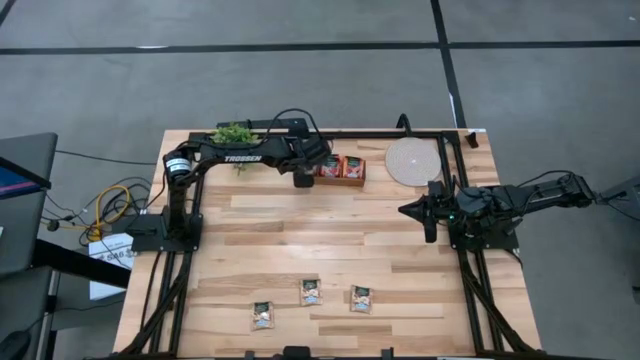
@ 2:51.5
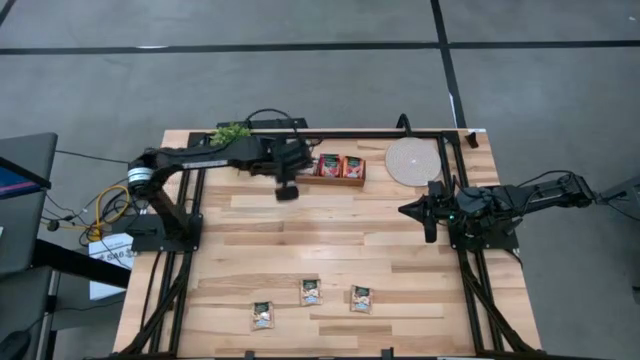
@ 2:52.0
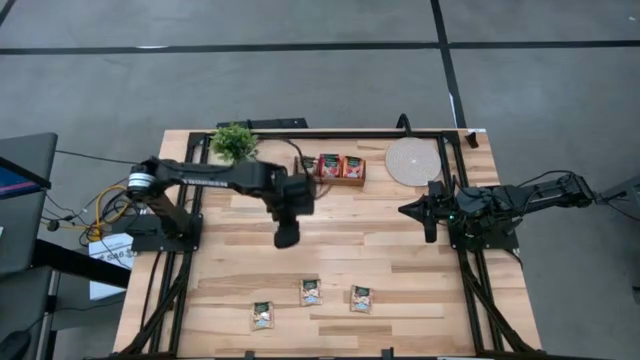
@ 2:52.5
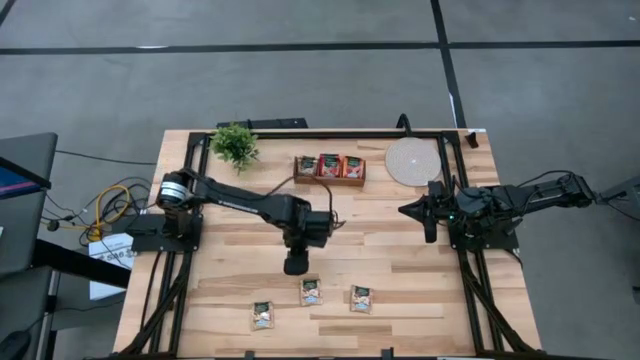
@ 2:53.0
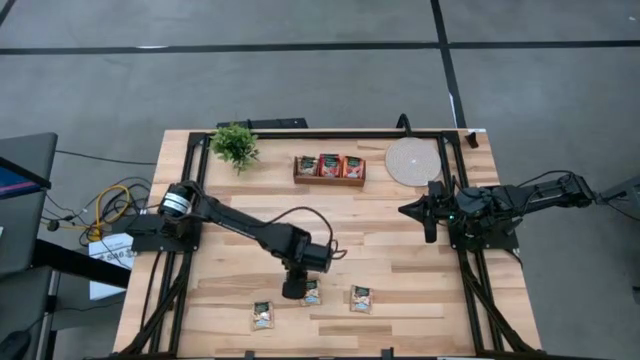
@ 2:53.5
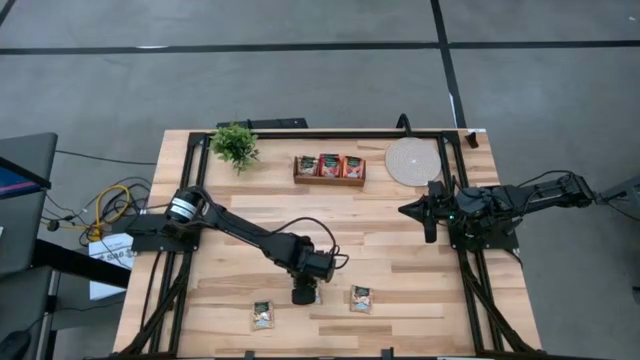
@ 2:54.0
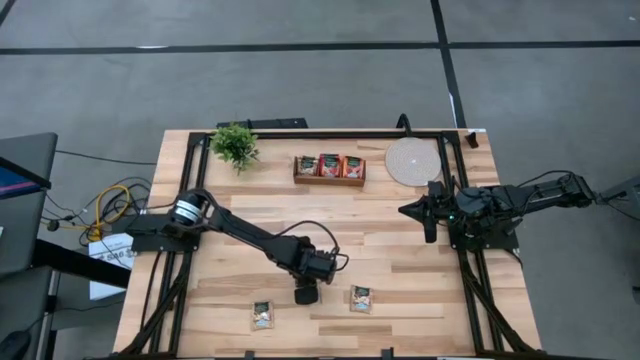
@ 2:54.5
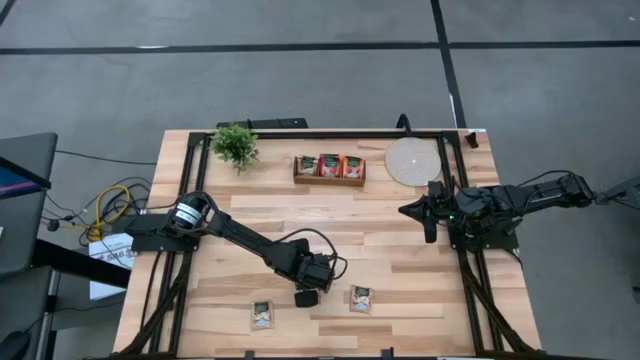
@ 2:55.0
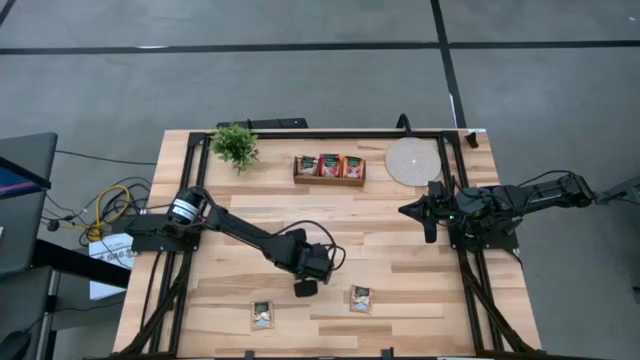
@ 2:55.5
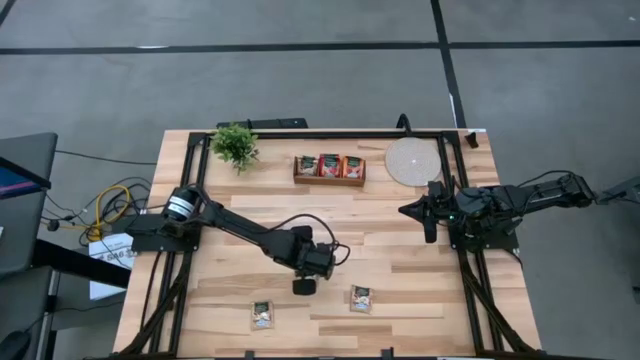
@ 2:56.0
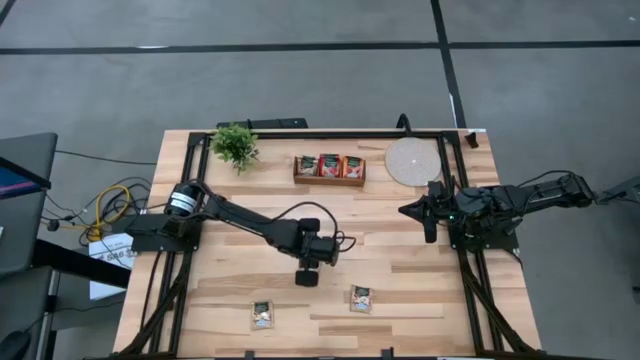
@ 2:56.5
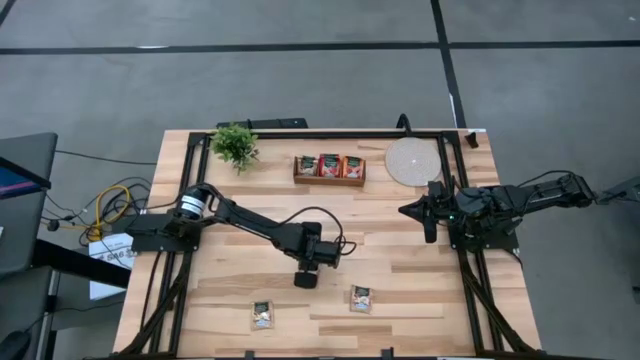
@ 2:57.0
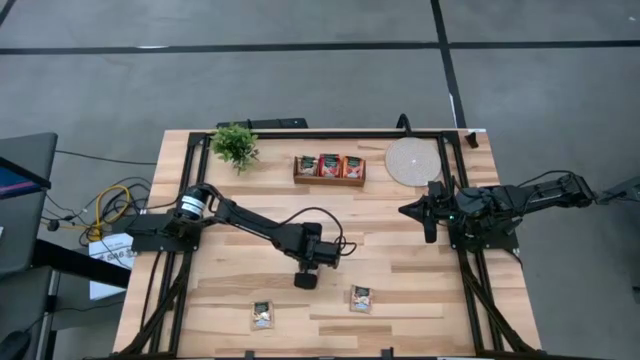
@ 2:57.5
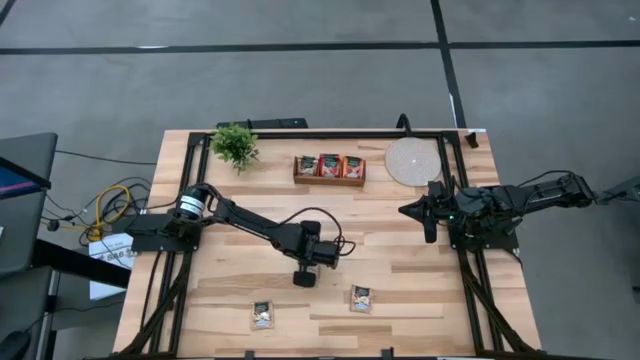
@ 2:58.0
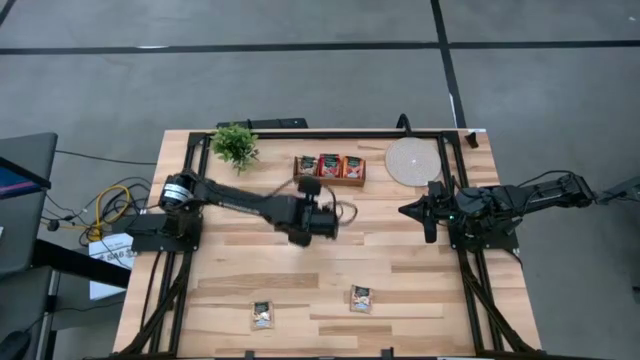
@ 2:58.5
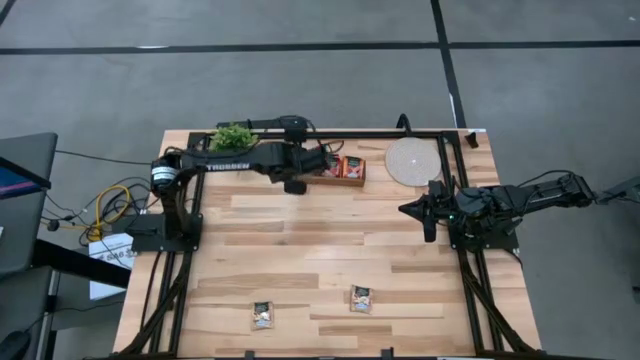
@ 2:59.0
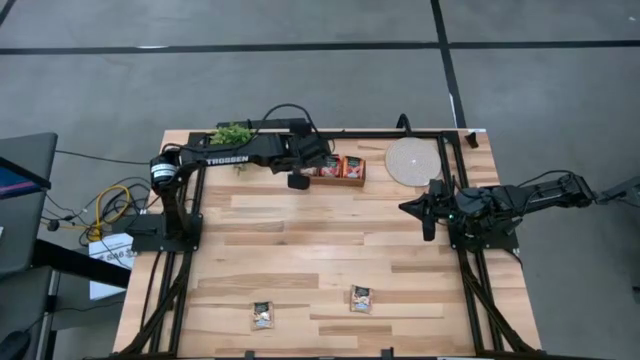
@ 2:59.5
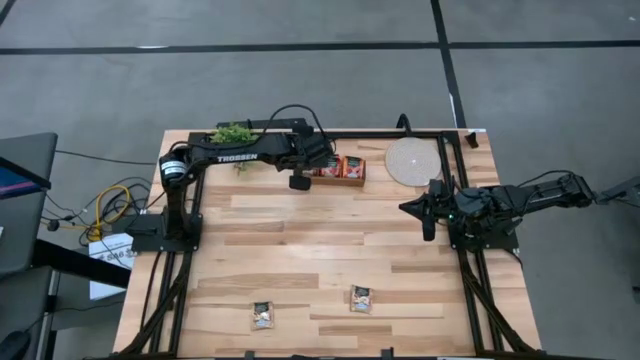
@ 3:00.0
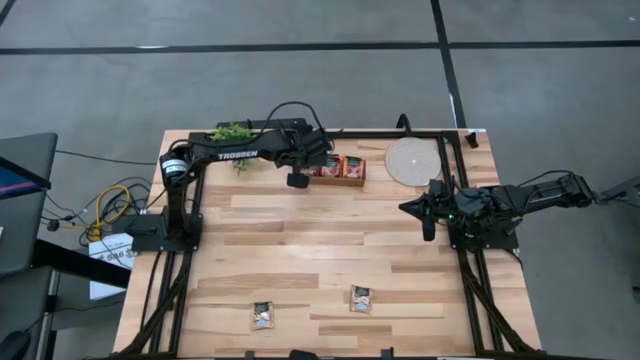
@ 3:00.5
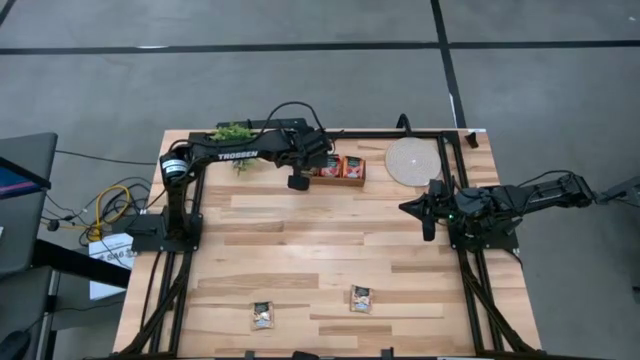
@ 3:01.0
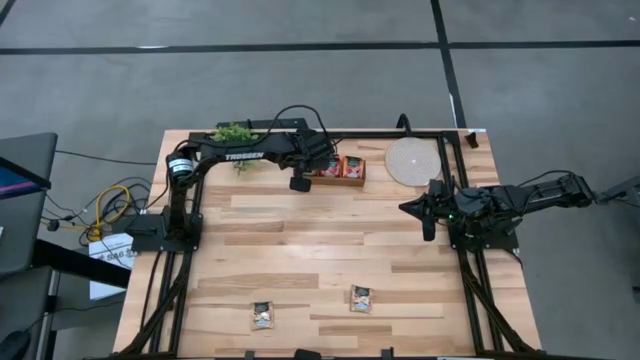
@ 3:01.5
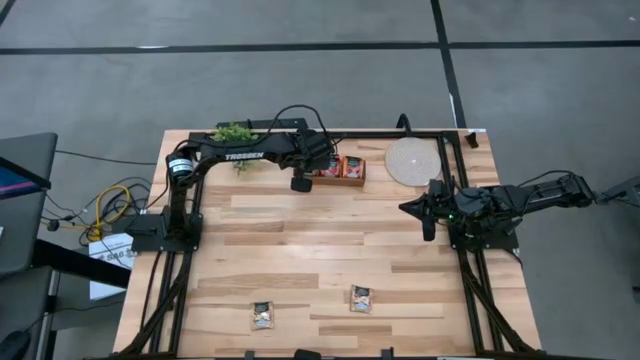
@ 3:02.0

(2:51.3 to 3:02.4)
Task: Pick & Place Tea
Put the brown tea bag into the left section of the wooden organizer

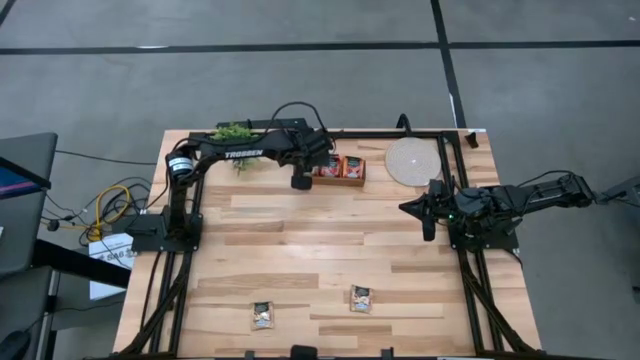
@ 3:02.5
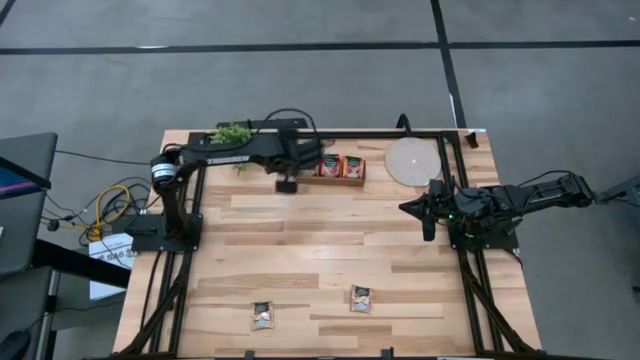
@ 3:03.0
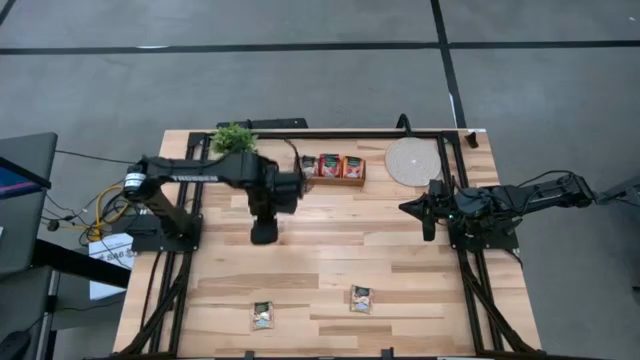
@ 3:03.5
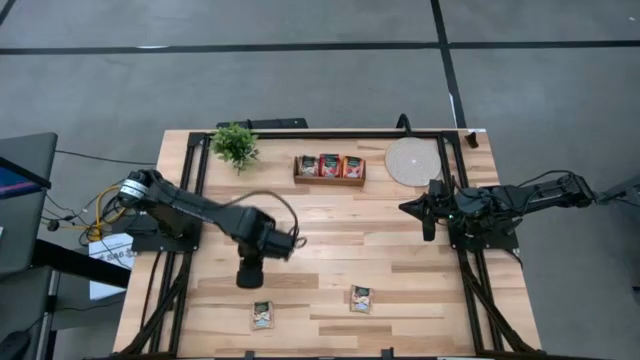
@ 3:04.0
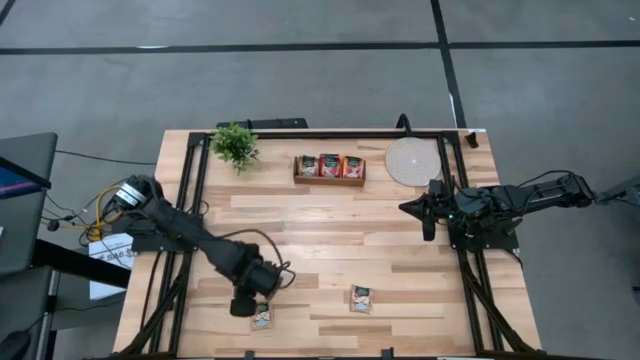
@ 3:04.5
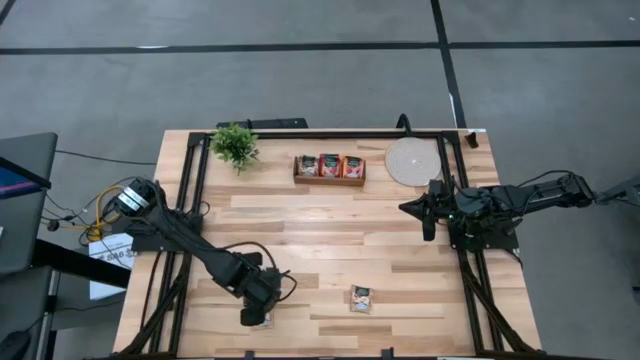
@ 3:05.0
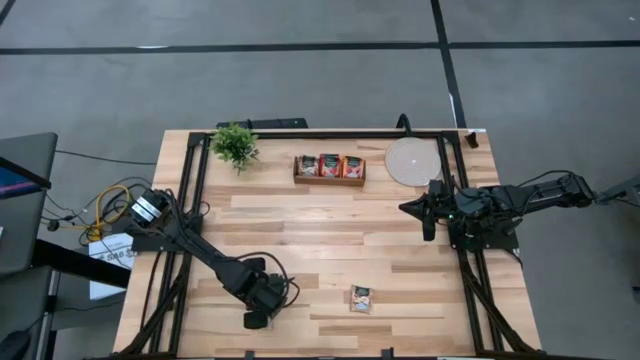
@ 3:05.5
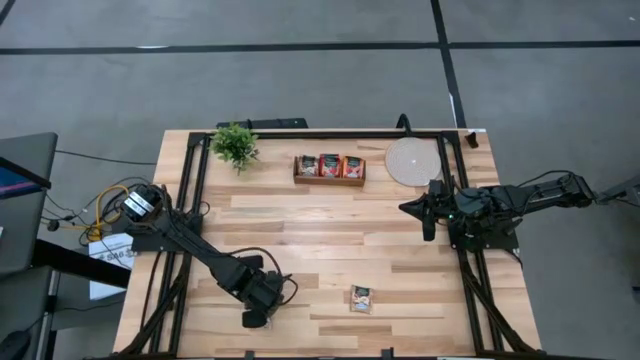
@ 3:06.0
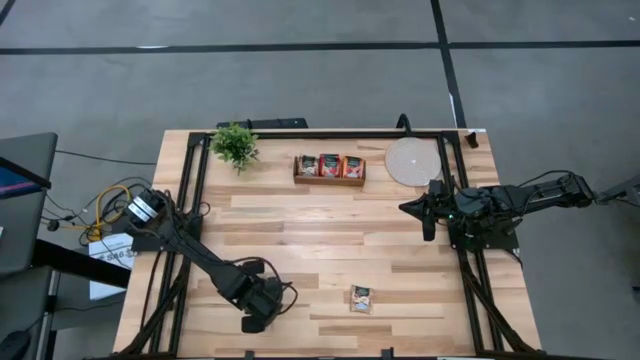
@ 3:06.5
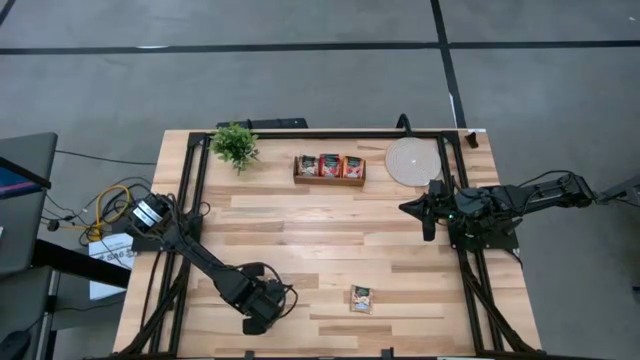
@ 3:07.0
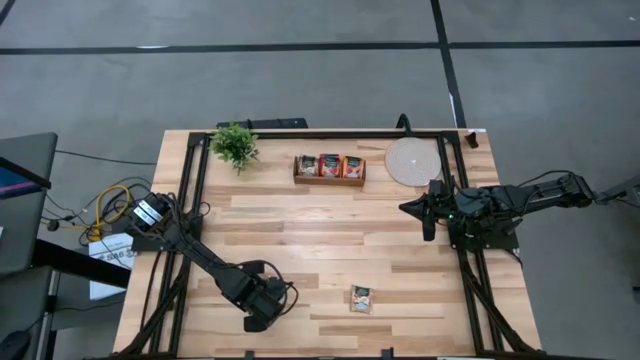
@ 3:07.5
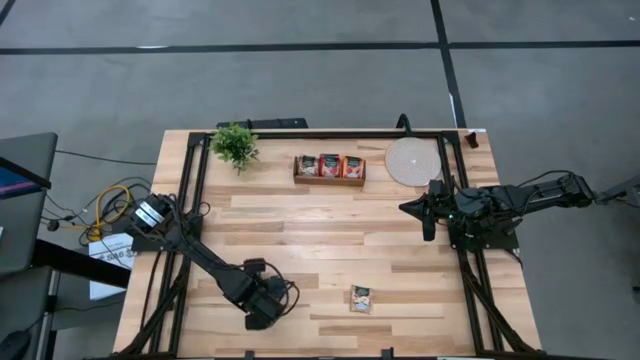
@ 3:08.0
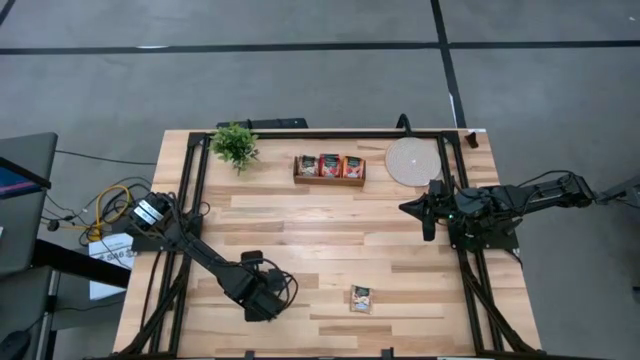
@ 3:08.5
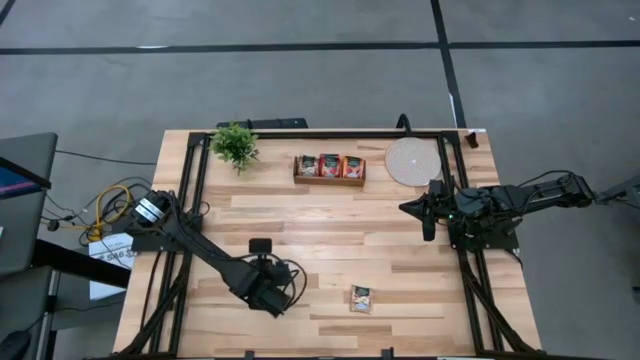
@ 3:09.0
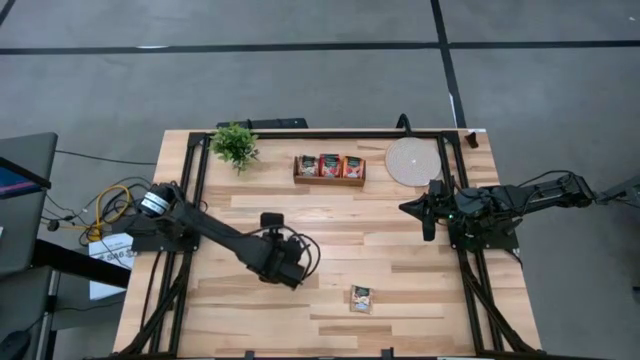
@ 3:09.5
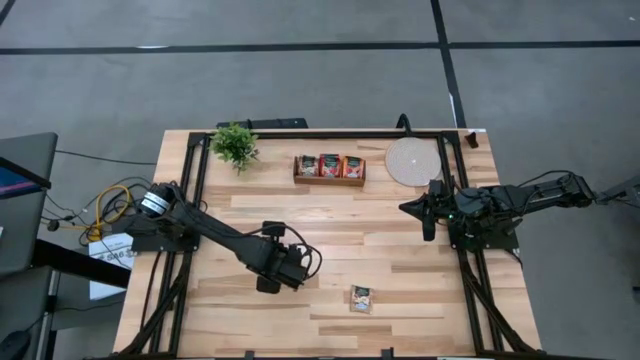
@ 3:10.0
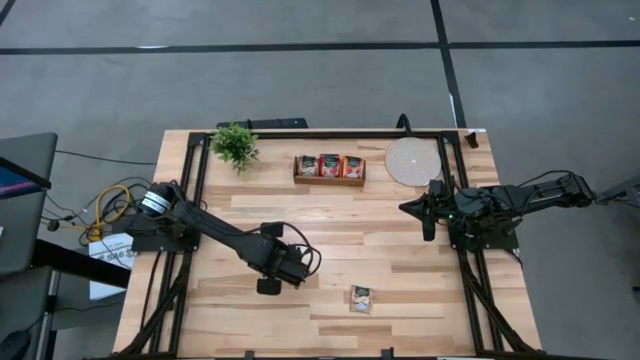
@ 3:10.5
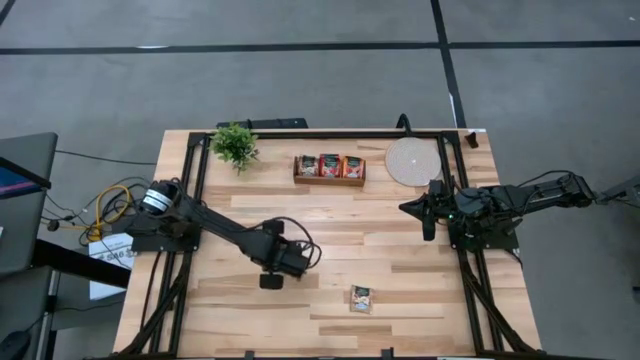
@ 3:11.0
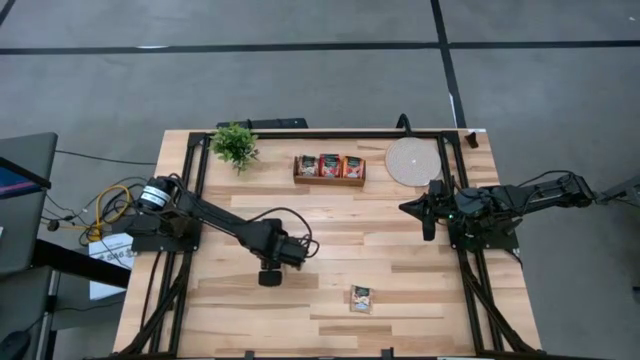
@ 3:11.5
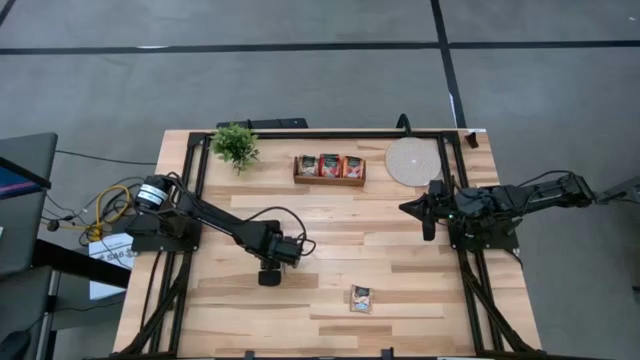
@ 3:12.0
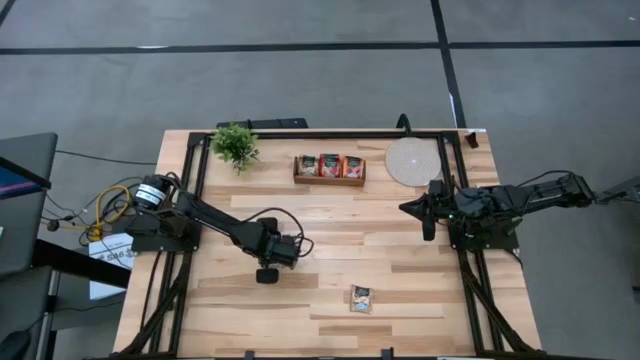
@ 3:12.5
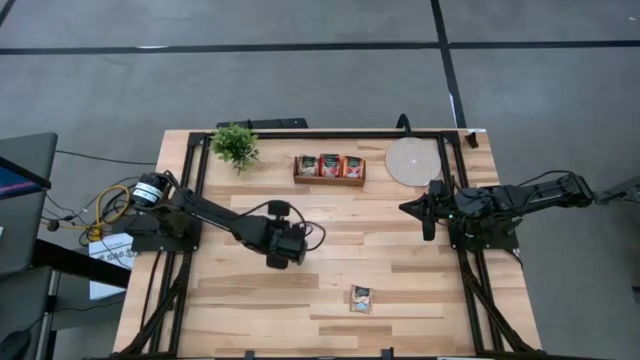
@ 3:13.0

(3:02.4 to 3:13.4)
Put the brown tea bag into the left section of the wooden organizer
